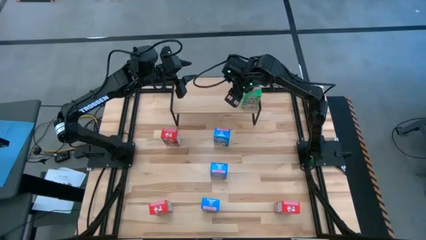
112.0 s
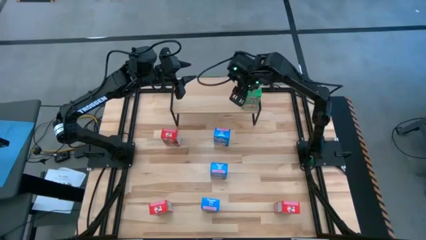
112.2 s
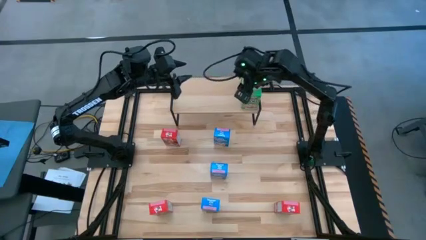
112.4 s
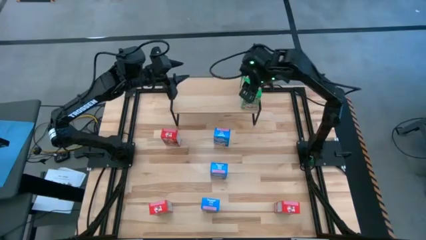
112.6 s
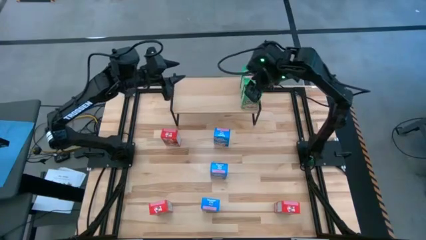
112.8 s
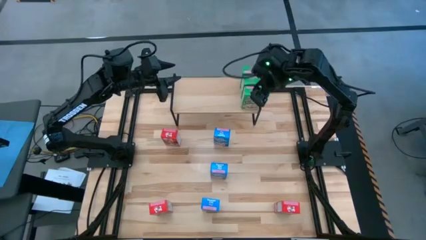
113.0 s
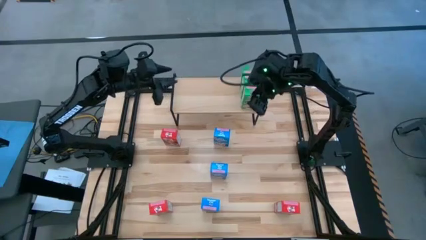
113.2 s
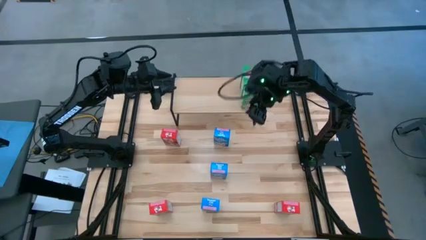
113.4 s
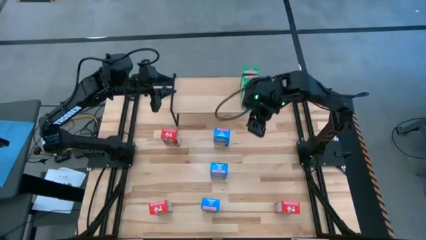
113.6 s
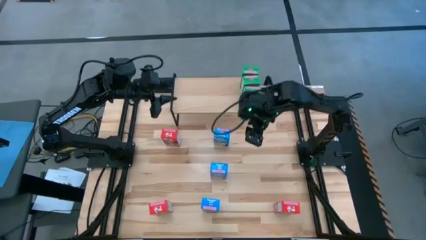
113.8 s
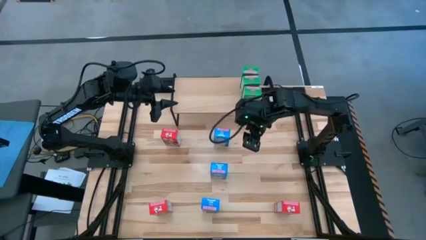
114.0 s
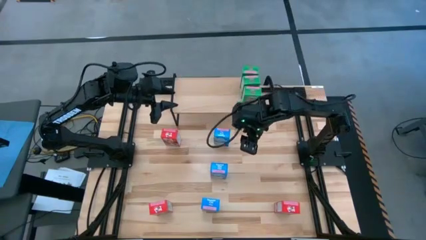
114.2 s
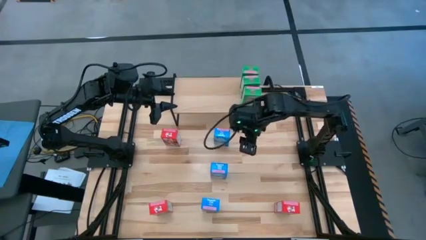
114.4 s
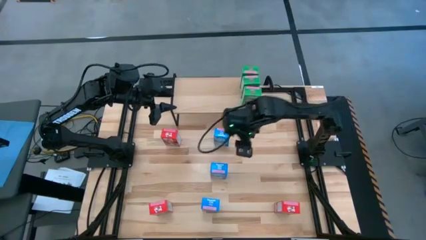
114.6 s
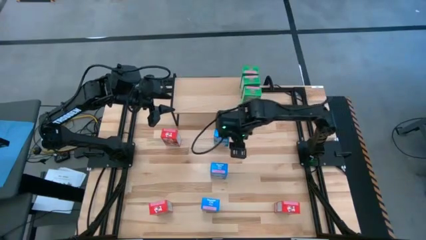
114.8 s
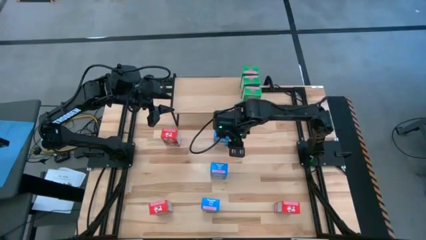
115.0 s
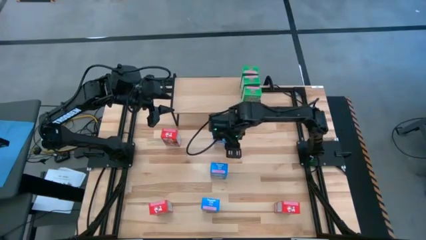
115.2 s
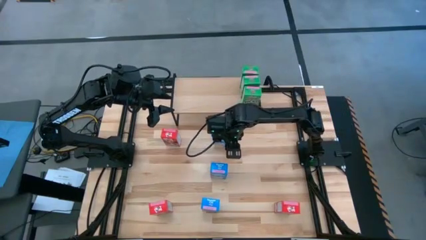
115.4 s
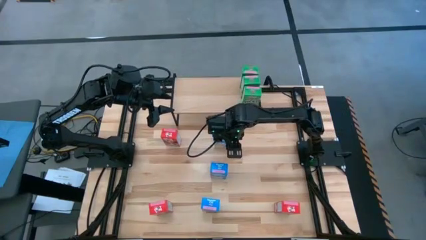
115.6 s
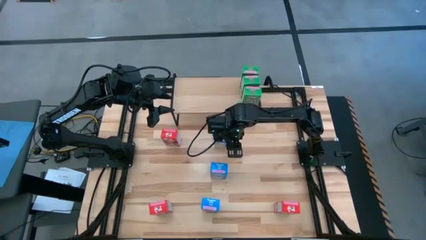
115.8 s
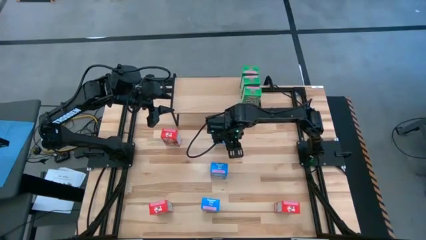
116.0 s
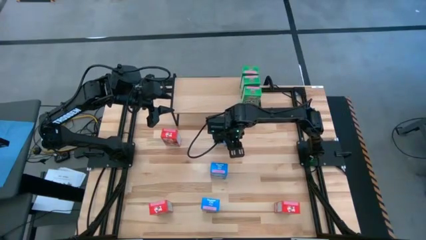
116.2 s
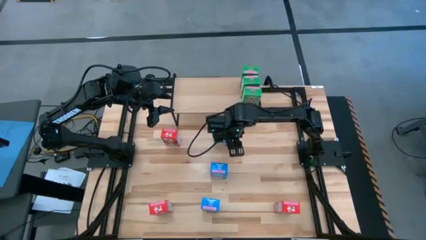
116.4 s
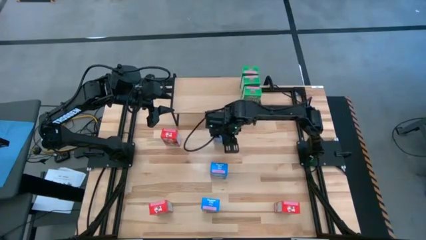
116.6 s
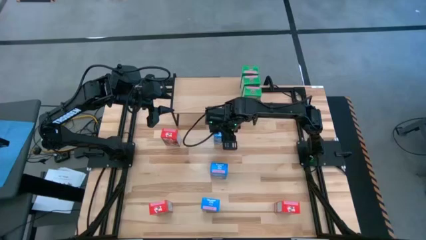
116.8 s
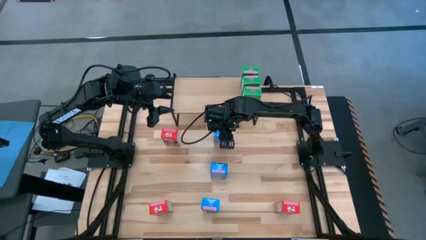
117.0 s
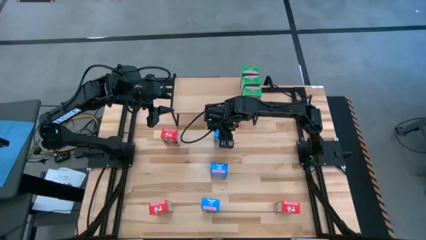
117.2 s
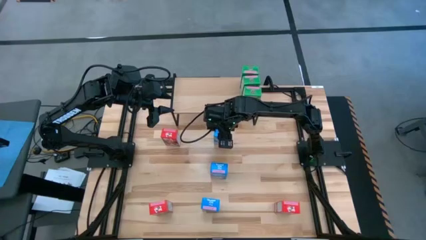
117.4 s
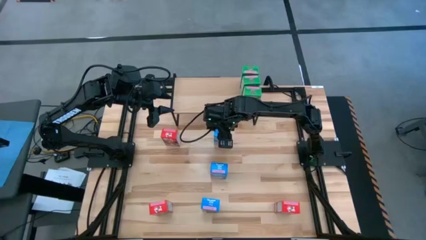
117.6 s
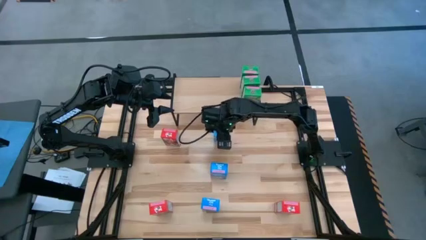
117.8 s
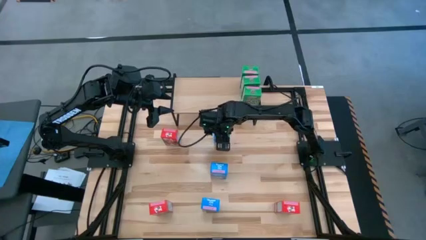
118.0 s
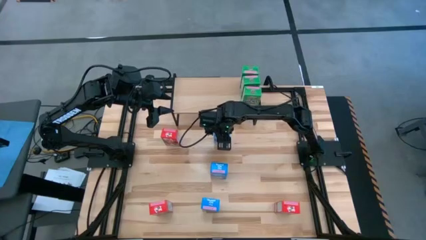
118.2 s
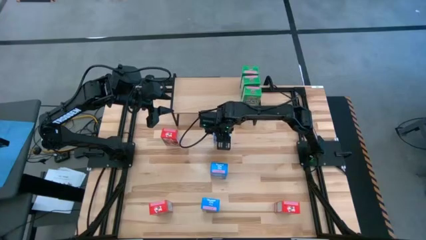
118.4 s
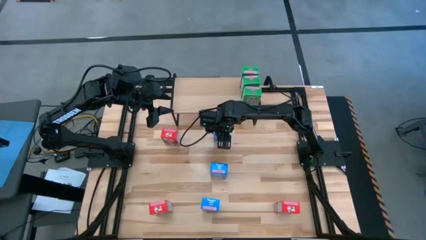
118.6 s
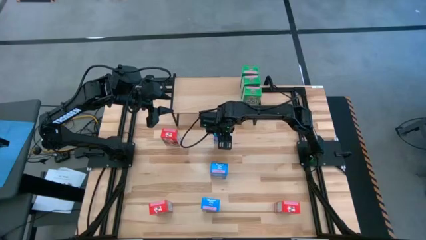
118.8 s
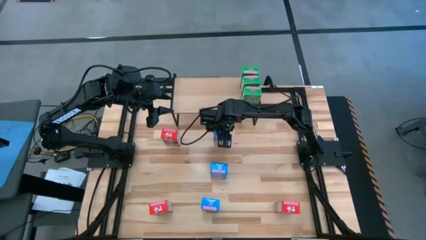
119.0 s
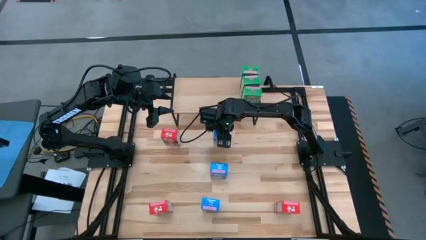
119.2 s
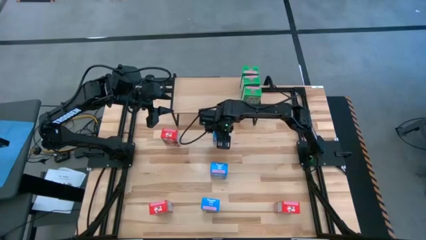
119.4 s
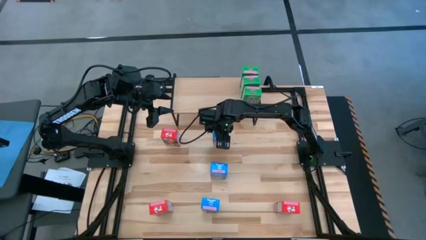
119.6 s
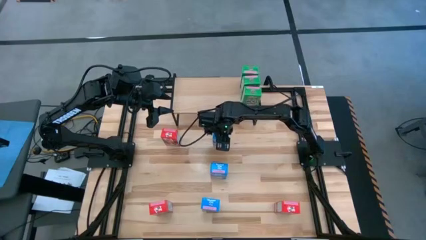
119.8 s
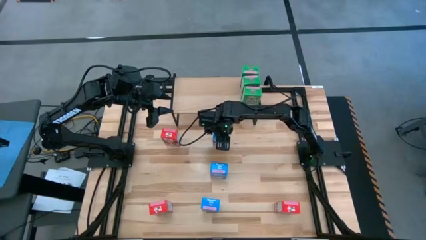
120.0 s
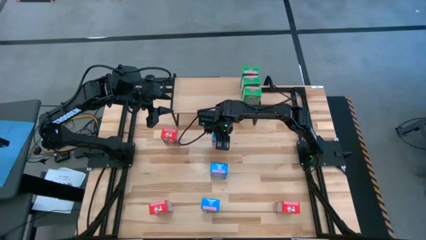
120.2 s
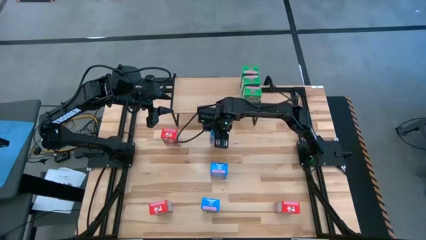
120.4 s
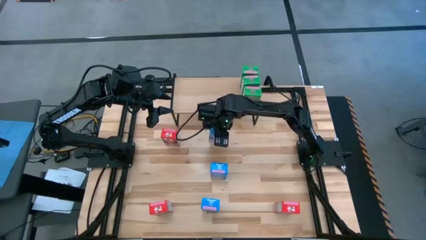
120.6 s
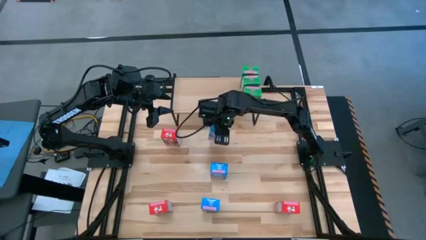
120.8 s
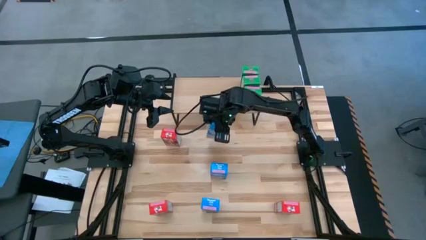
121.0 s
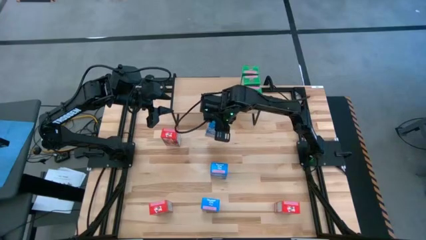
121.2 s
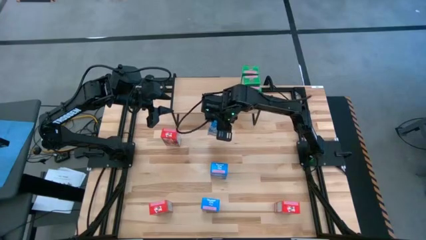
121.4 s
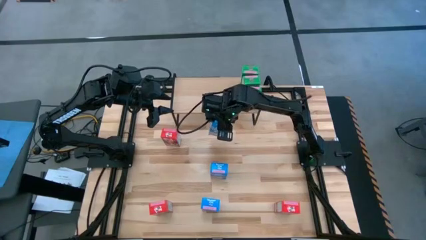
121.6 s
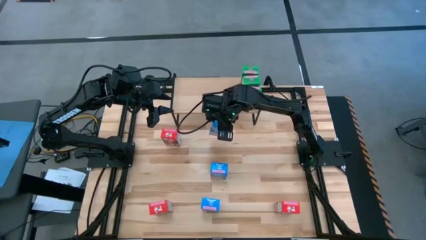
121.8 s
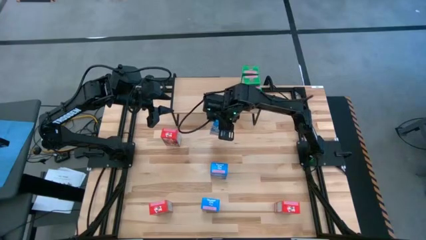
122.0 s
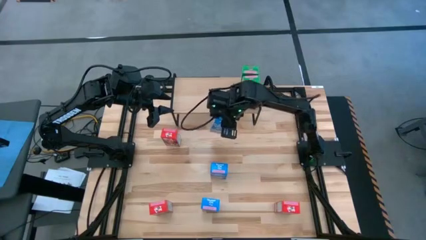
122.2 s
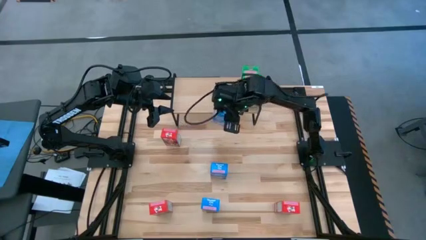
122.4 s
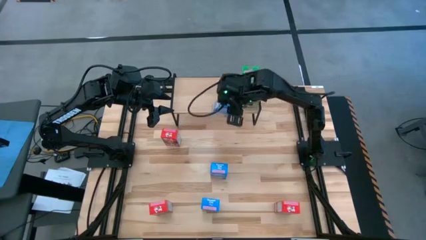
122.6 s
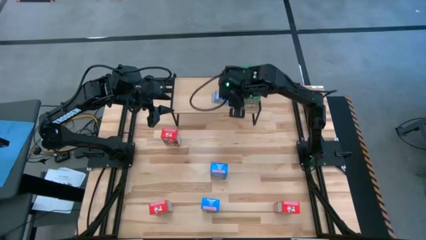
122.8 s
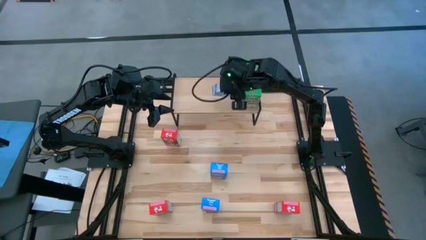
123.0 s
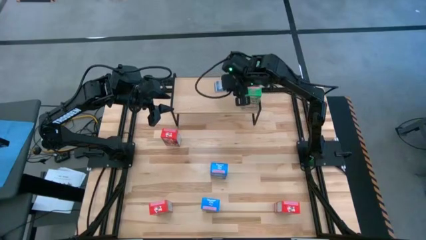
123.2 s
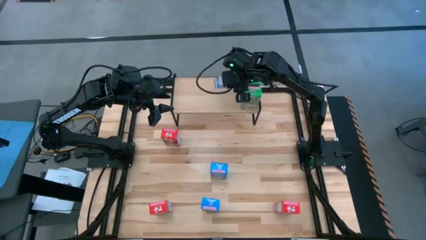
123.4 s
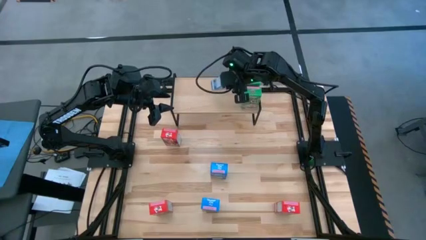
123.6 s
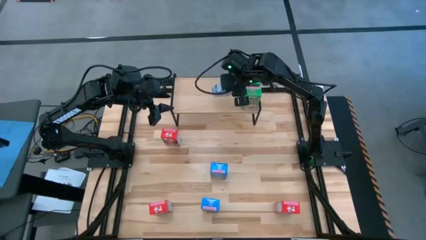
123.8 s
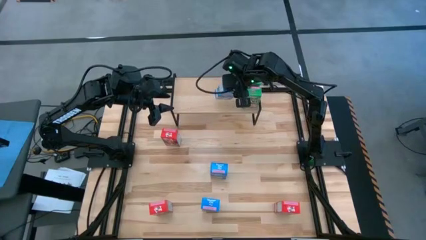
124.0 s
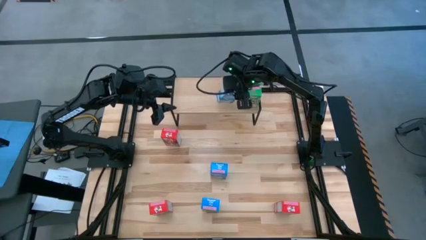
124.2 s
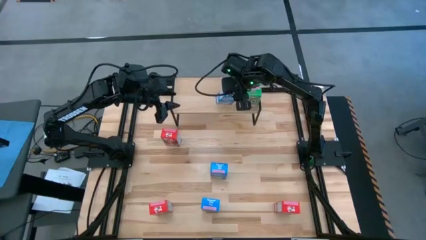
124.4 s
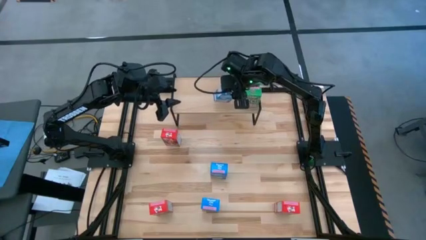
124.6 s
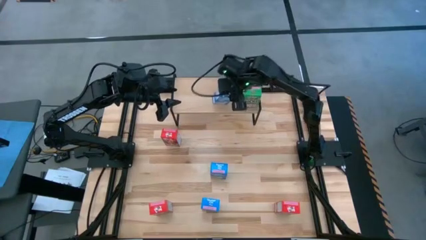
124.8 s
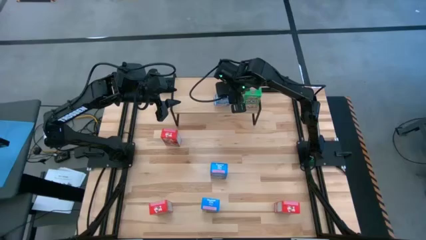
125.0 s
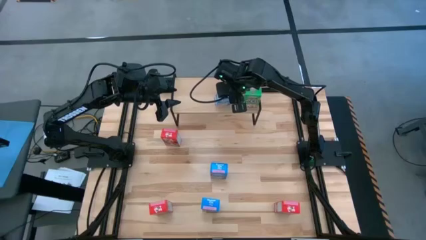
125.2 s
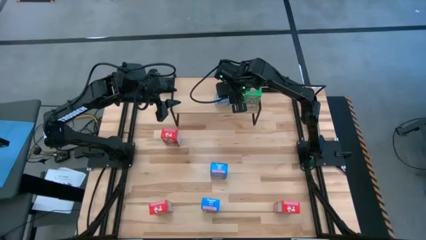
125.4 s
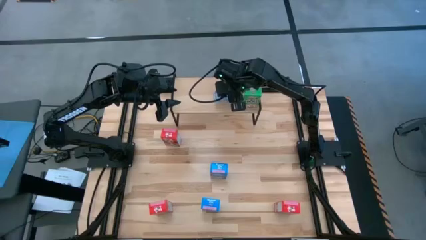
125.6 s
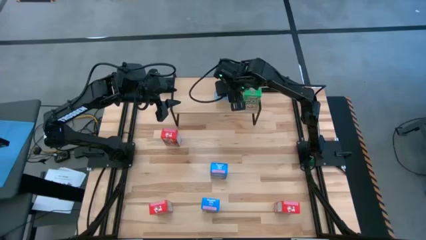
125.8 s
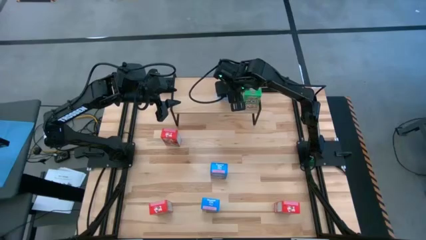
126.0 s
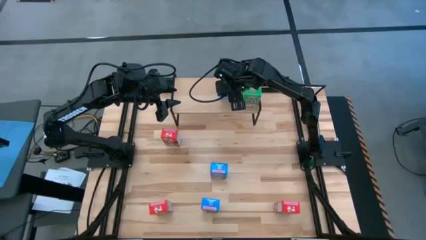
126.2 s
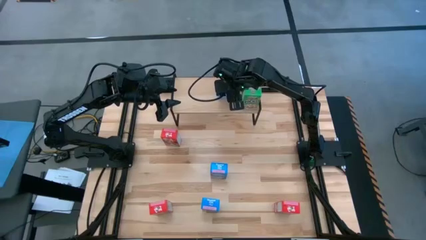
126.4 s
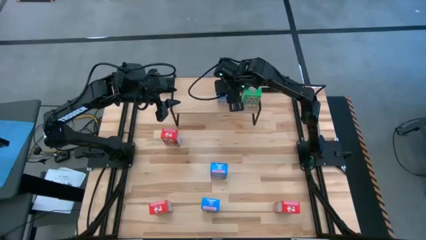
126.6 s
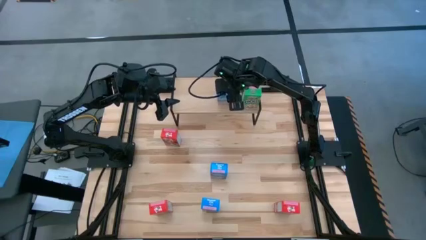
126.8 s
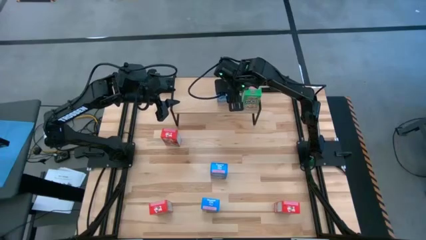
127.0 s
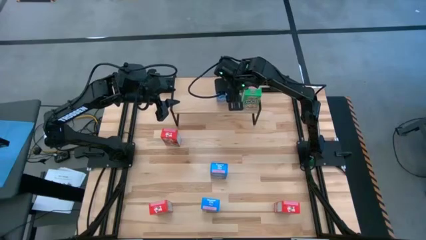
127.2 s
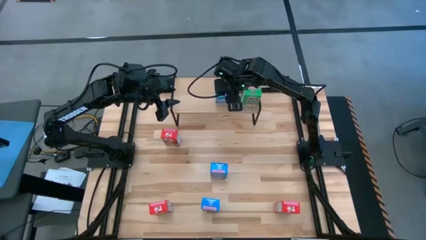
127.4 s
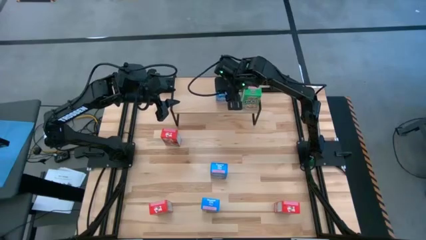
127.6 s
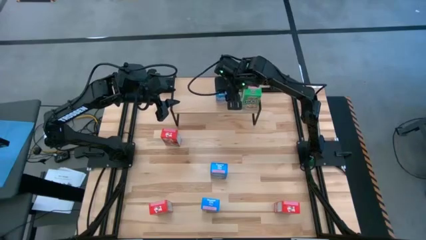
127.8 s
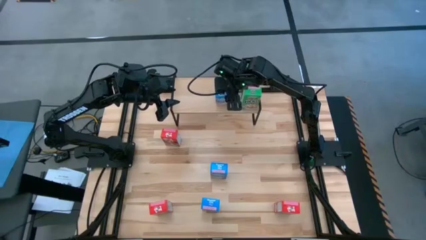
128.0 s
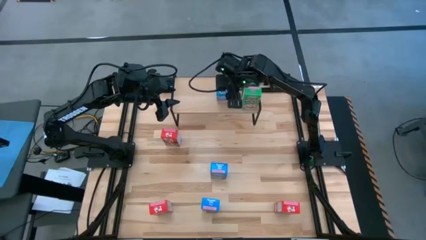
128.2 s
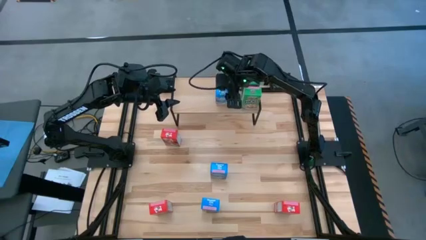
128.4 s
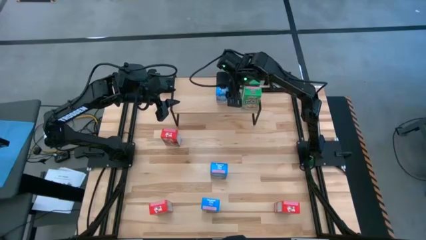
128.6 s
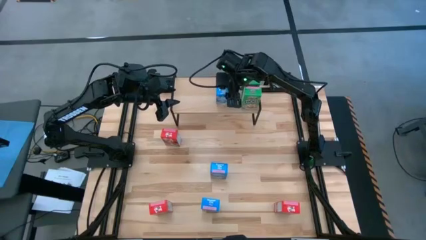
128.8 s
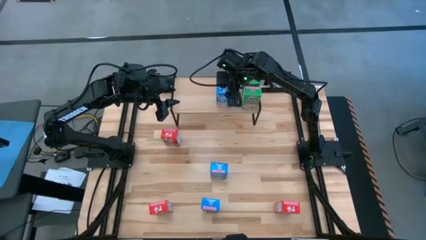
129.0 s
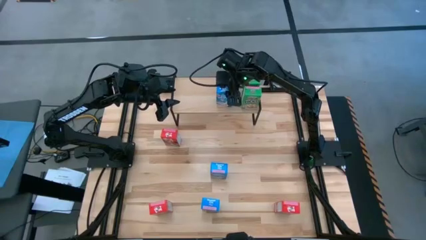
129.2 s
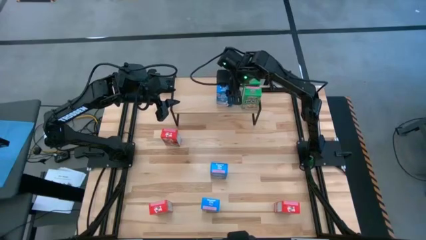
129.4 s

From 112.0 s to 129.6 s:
Task: Stack cereal on shelf
Put the top blue cereal box on the shelf
